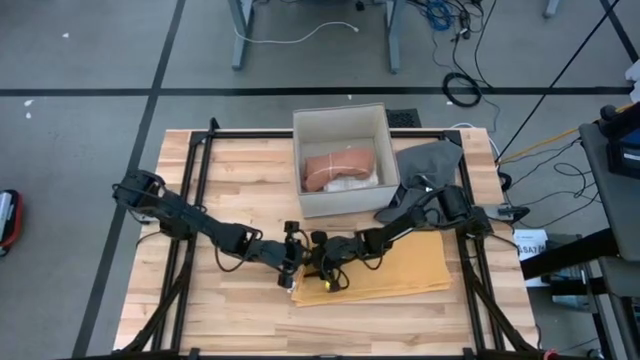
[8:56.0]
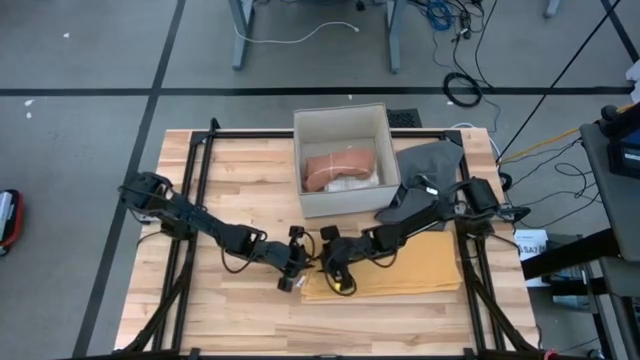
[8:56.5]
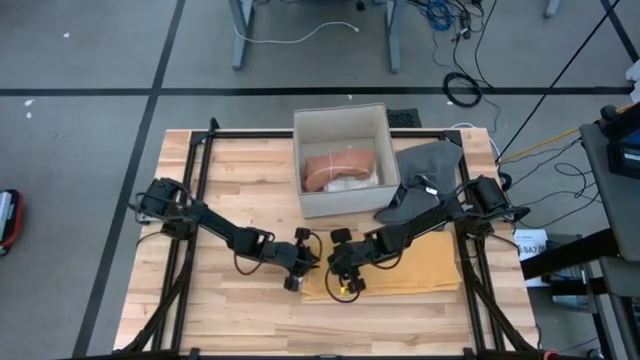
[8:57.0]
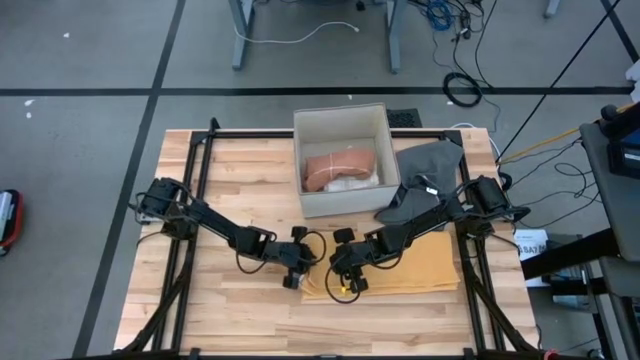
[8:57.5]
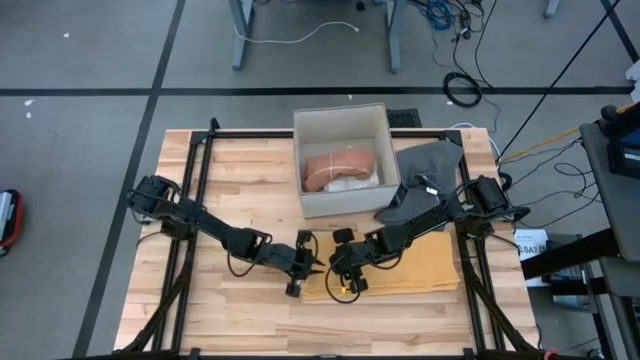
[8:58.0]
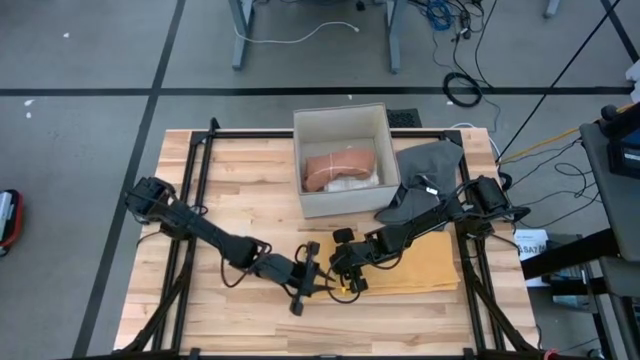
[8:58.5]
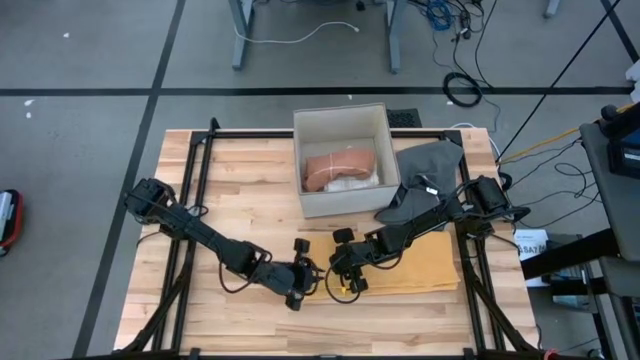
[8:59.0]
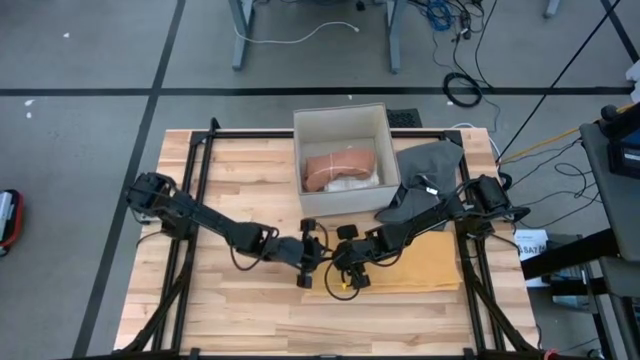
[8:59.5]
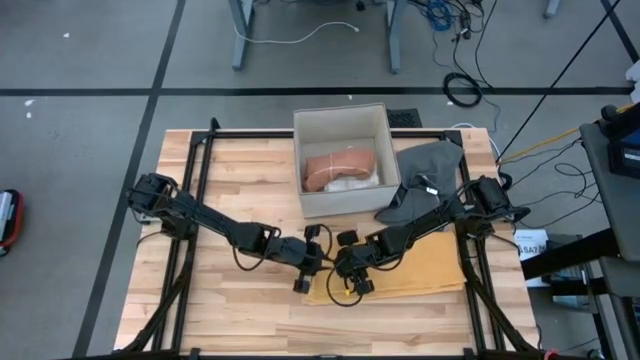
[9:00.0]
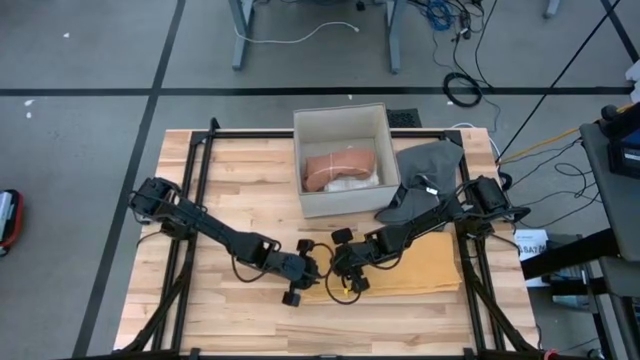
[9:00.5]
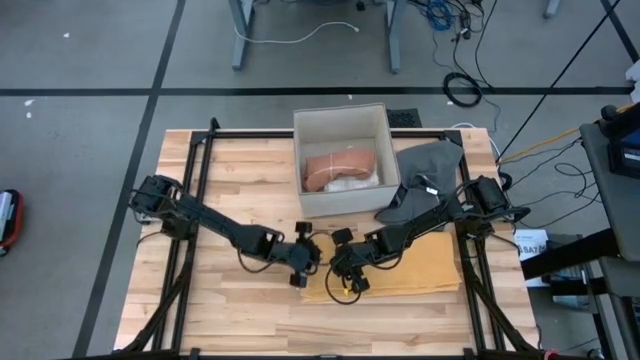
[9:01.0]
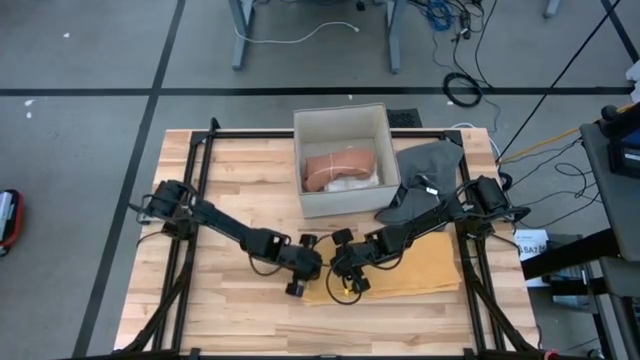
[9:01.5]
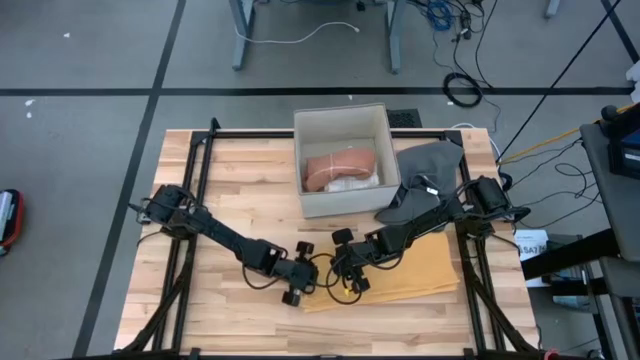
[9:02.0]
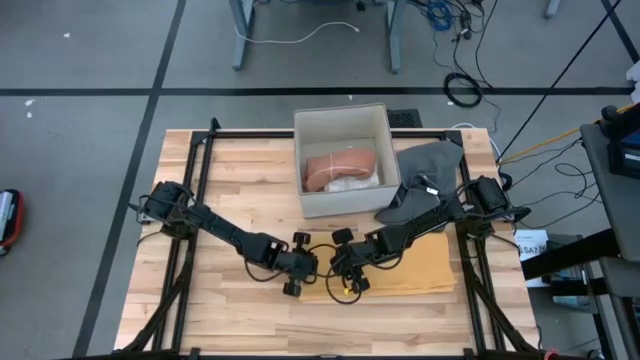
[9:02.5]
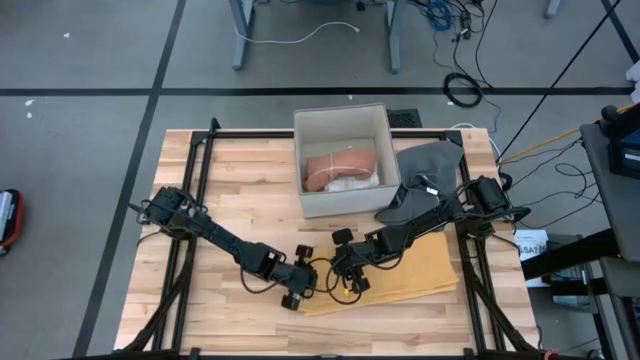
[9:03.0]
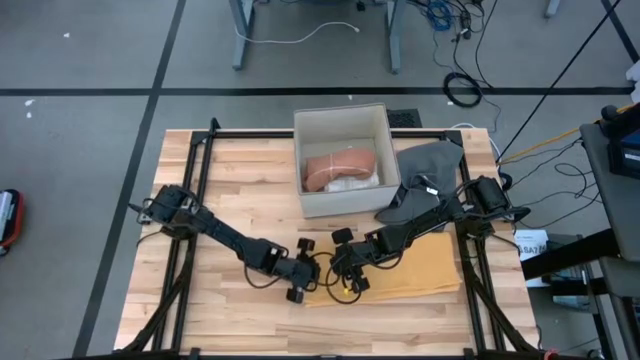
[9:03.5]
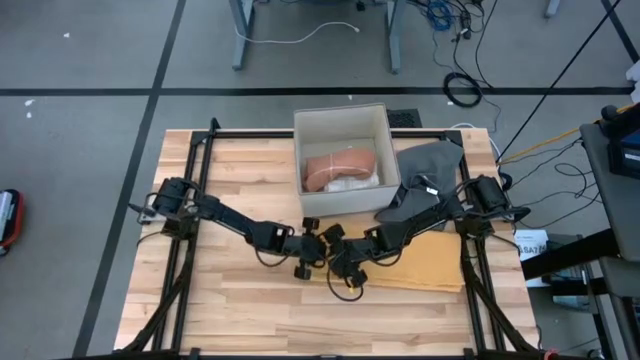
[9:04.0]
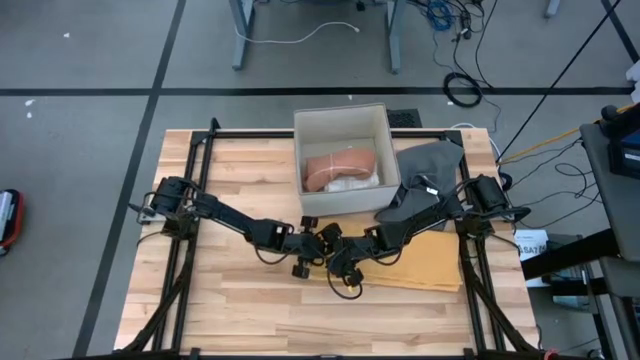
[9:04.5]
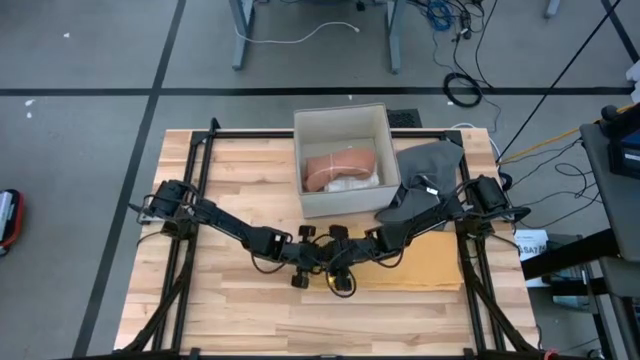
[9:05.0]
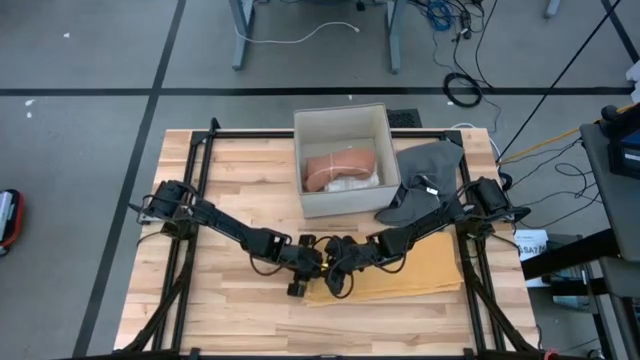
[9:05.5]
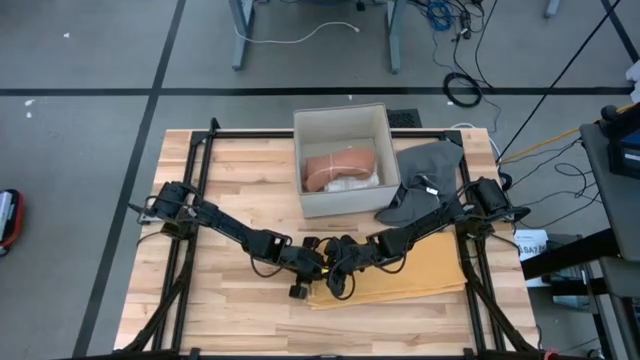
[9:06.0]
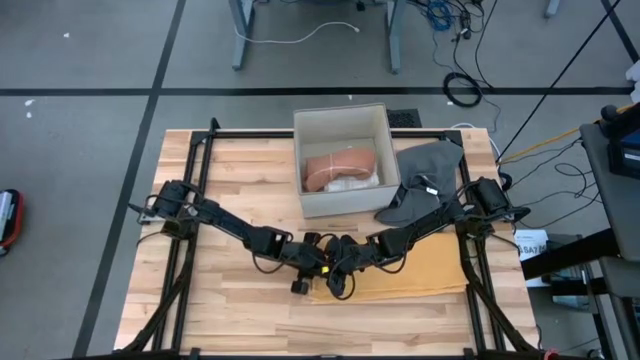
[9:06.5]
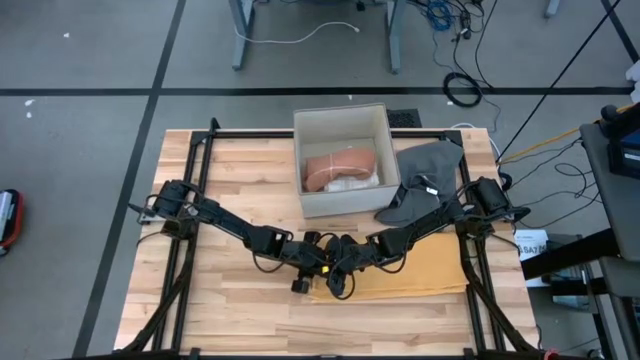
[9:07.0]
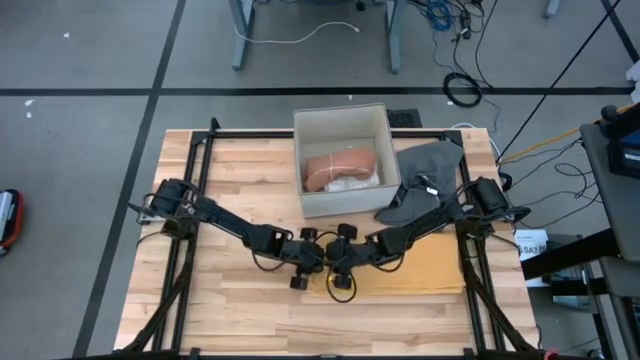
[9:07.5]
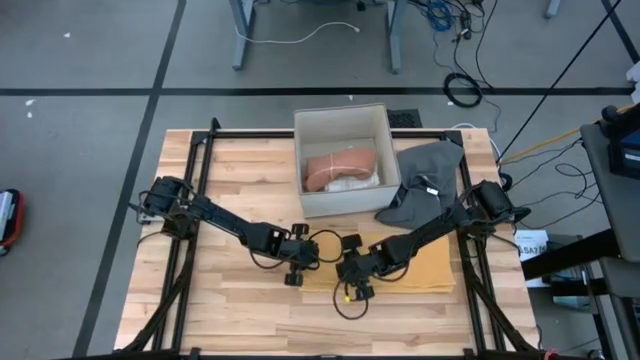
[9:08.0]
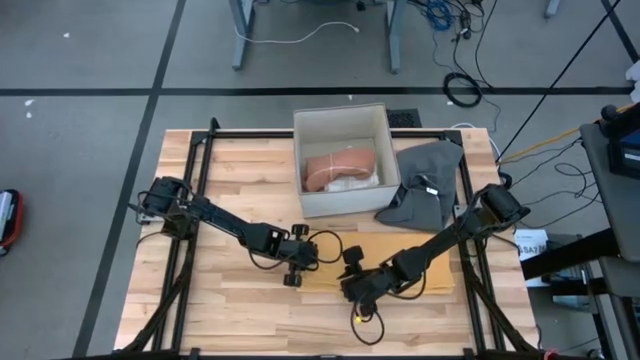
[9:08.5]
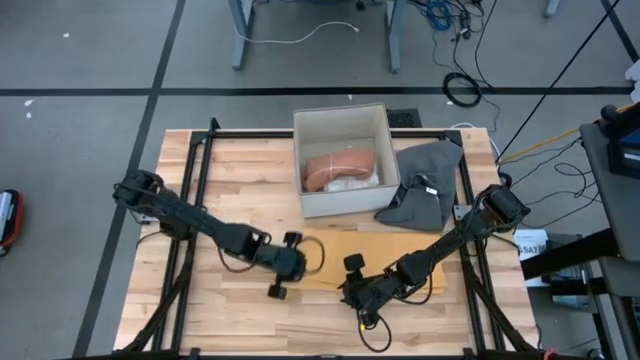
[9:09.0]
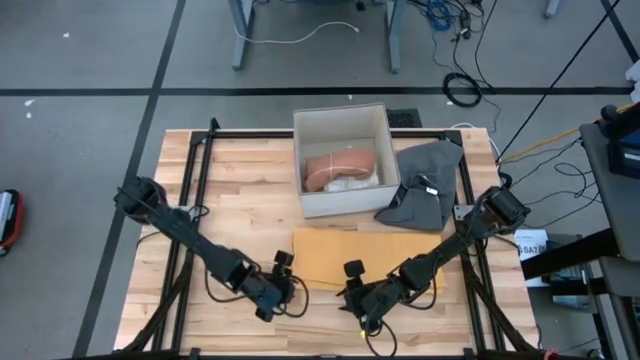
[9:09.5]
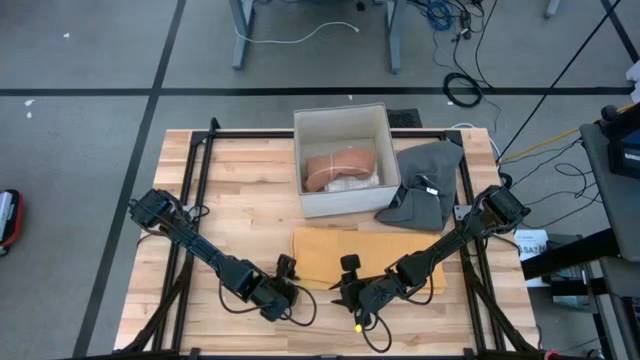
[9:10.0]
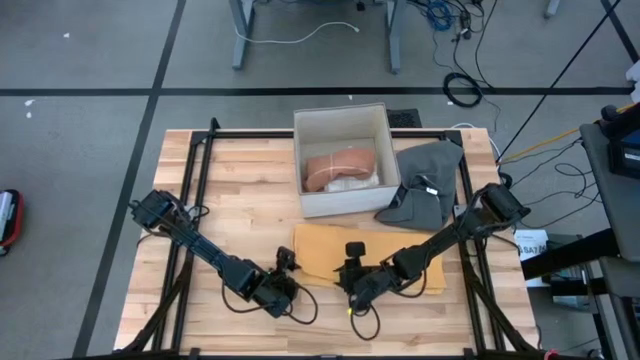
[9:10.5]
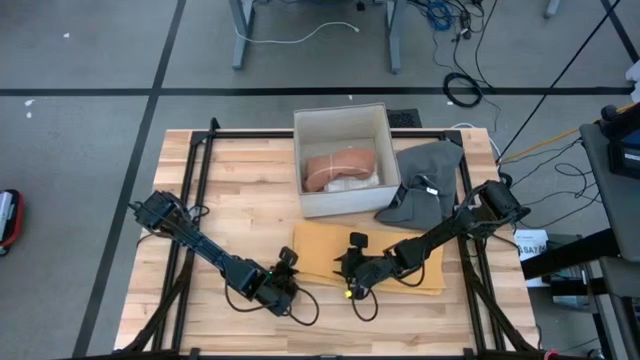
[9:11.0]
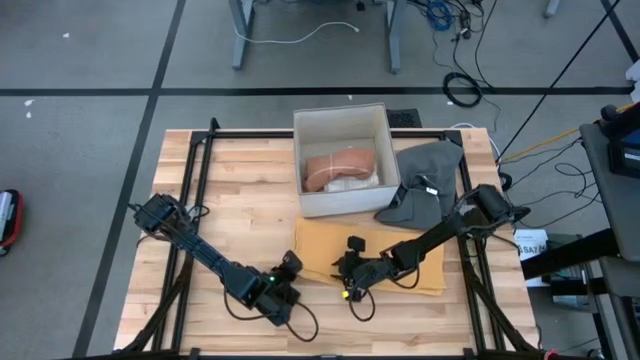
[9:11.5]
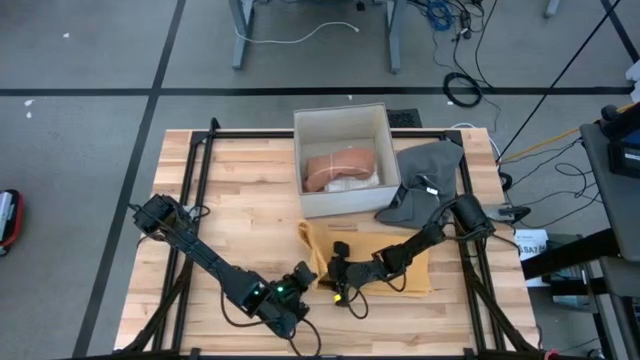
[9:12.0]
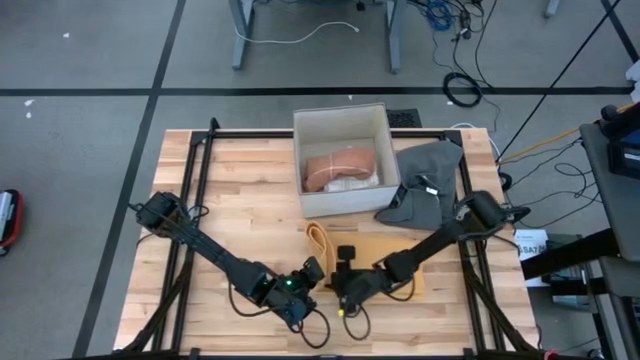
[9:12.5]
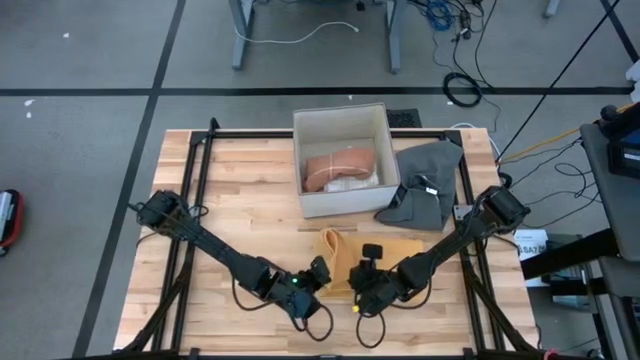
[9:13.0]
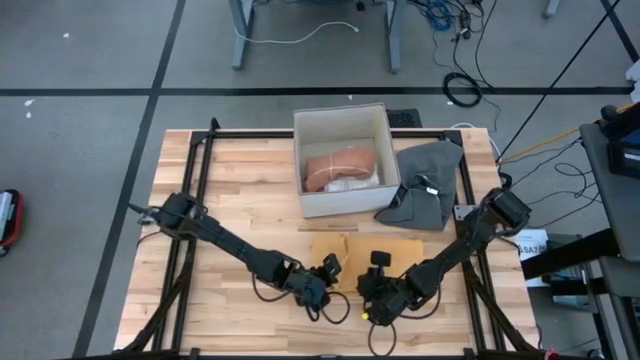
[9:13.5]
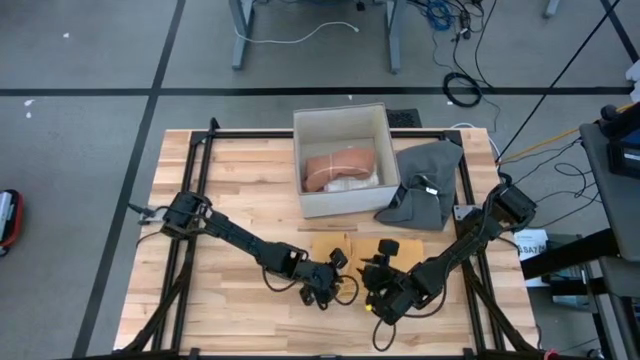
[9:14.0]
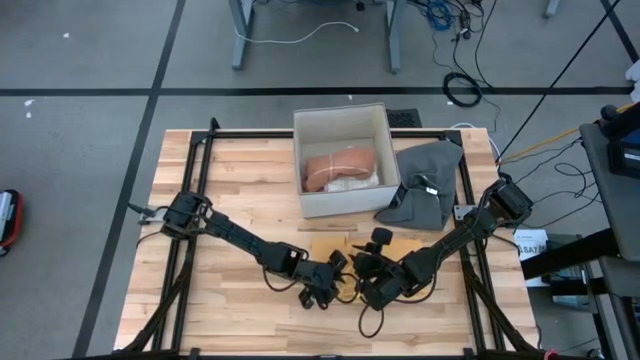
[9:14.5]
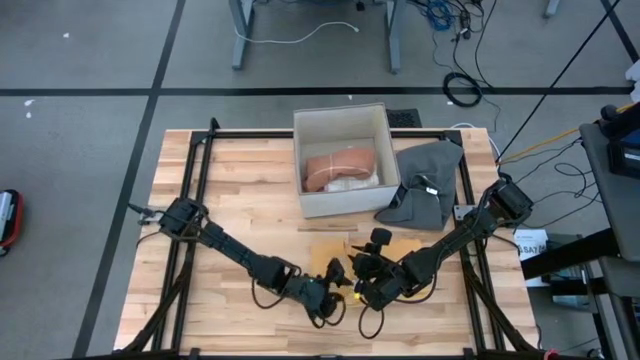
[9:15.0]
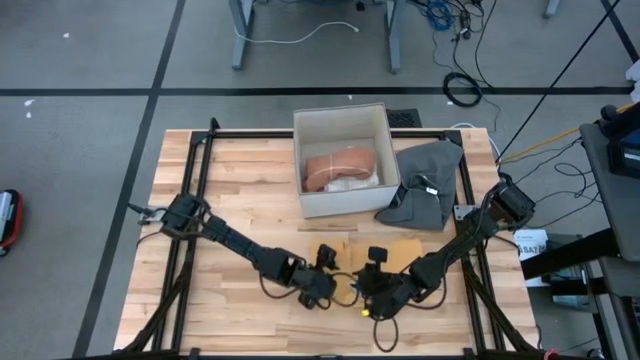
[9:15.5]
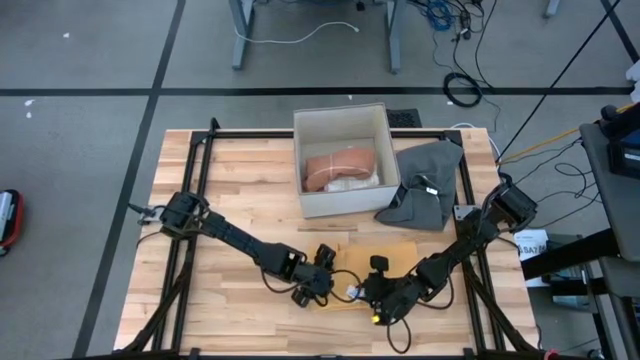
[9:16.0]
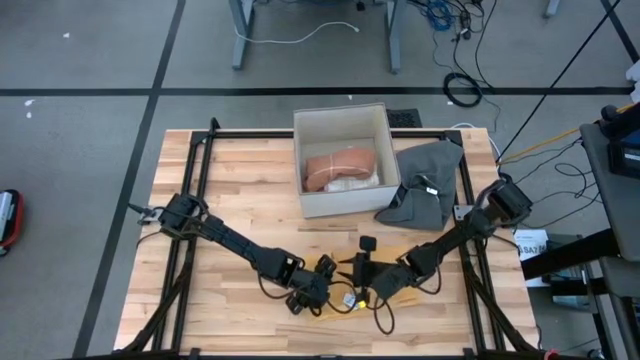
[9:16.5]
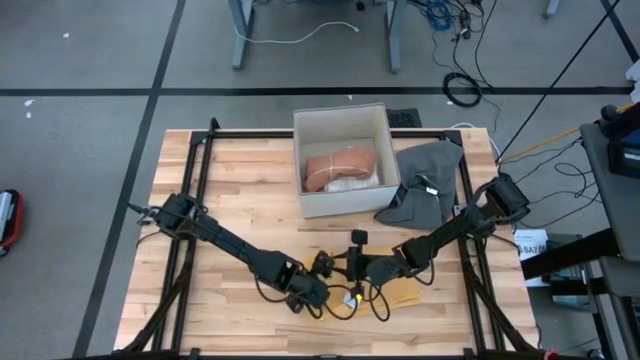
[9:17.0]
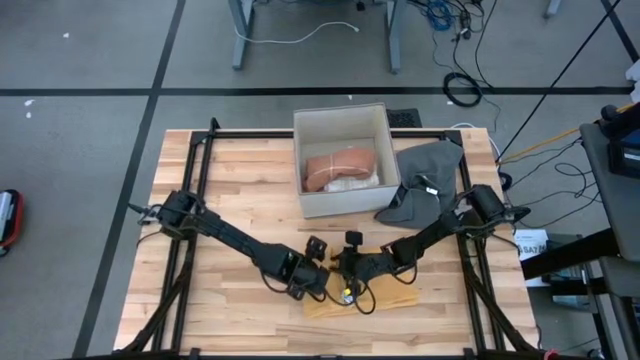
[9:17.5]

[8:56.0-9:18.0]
Task: Fold towel
Fold the orange towel
